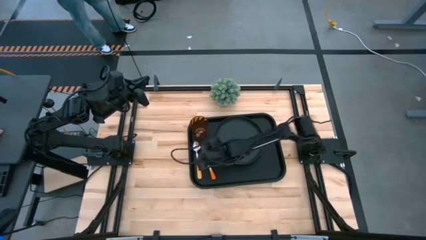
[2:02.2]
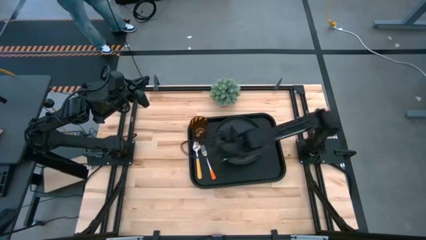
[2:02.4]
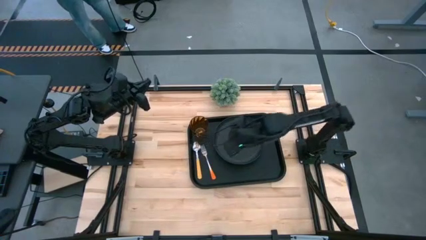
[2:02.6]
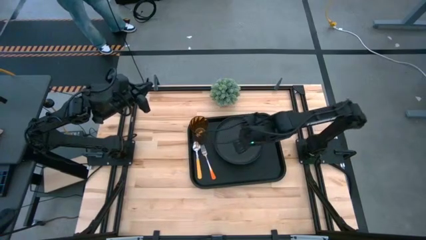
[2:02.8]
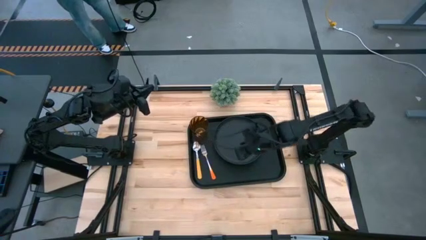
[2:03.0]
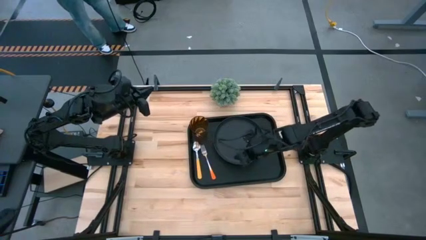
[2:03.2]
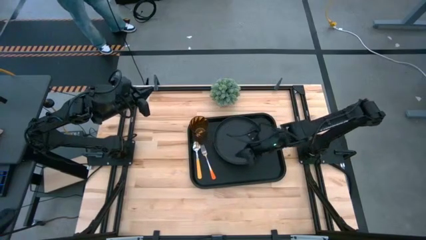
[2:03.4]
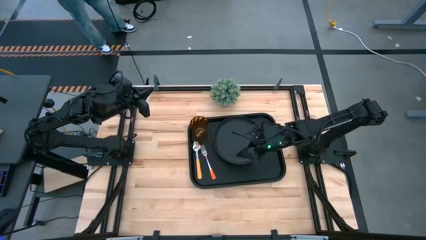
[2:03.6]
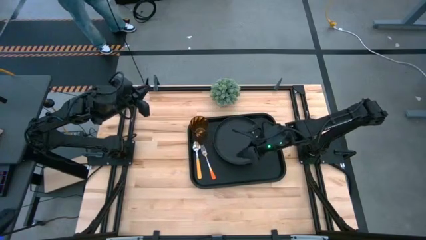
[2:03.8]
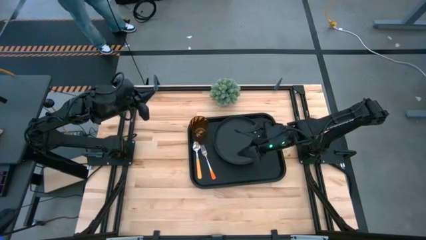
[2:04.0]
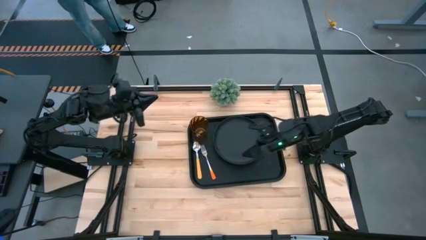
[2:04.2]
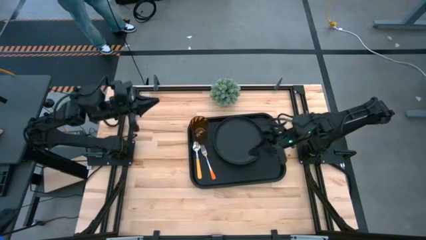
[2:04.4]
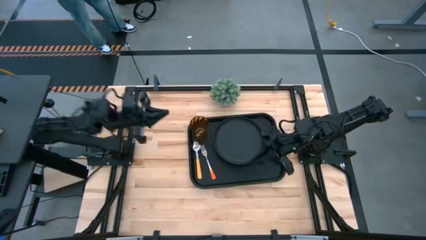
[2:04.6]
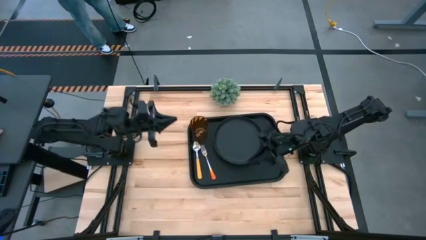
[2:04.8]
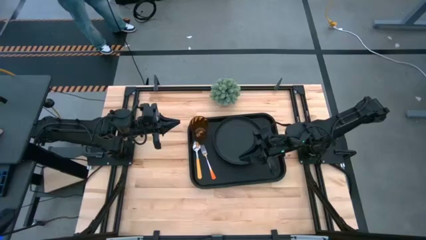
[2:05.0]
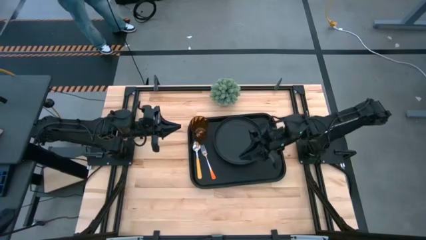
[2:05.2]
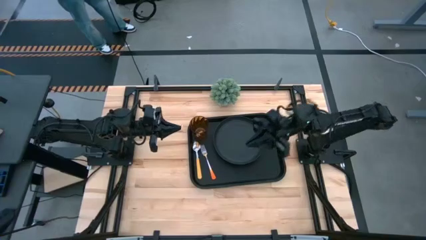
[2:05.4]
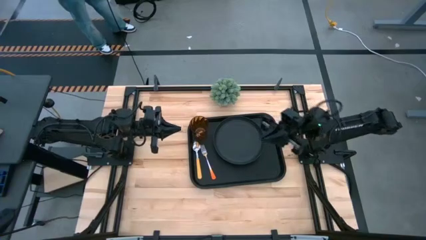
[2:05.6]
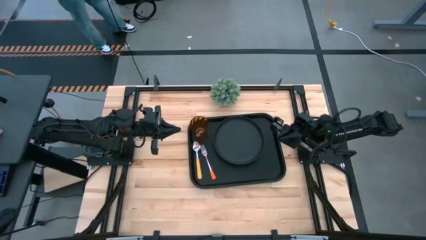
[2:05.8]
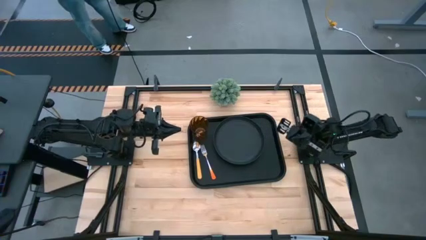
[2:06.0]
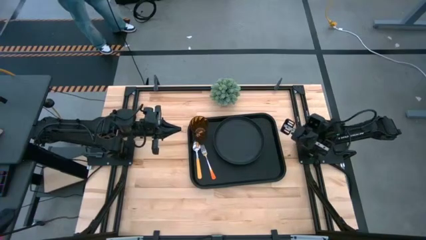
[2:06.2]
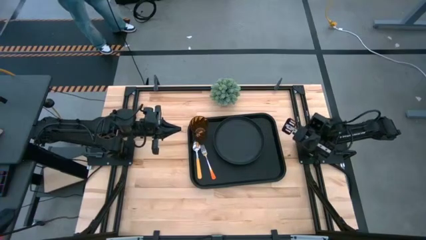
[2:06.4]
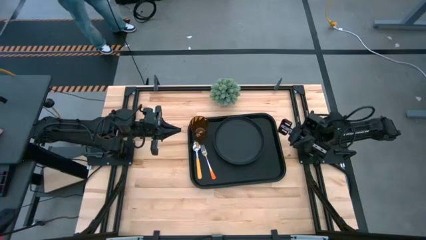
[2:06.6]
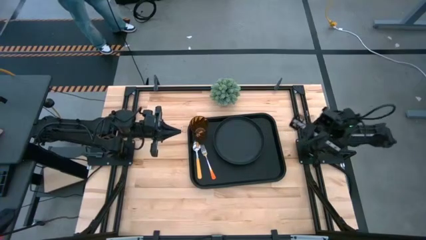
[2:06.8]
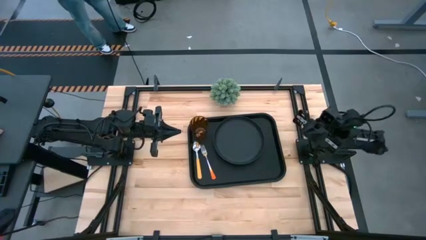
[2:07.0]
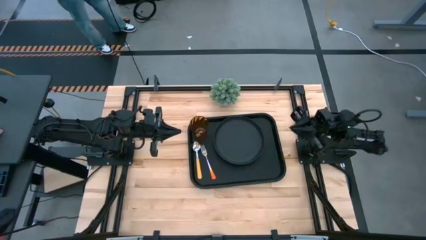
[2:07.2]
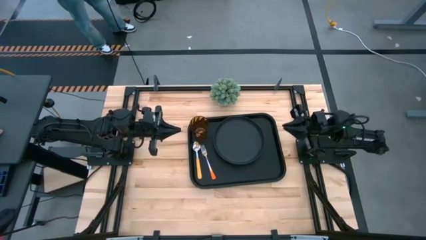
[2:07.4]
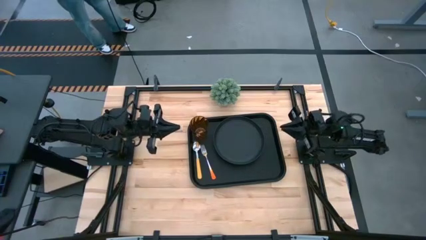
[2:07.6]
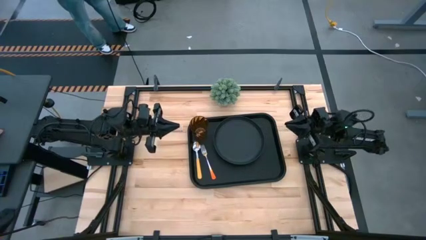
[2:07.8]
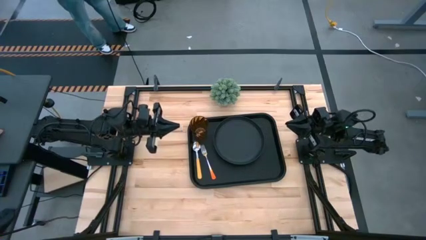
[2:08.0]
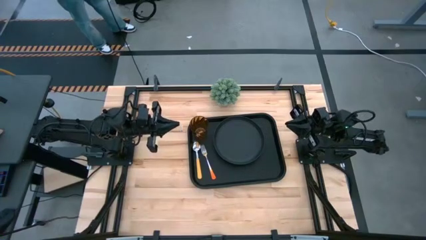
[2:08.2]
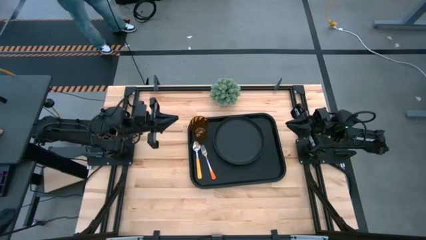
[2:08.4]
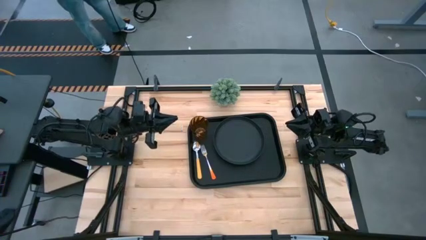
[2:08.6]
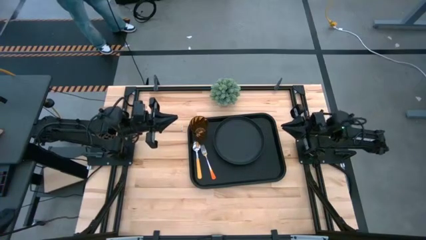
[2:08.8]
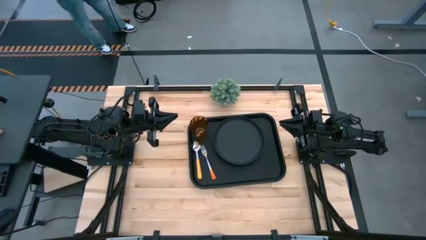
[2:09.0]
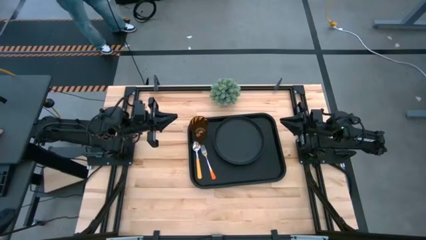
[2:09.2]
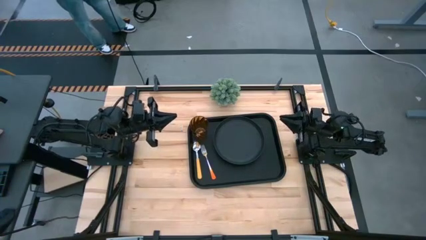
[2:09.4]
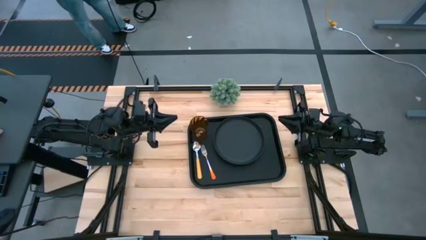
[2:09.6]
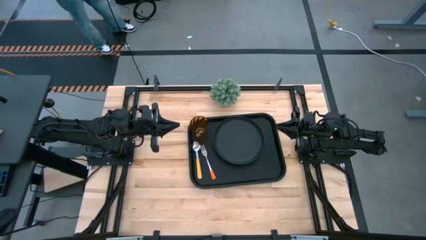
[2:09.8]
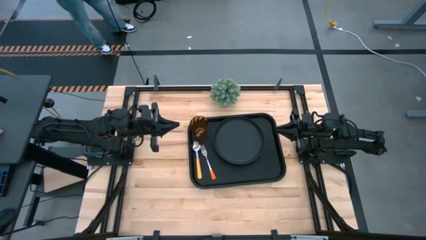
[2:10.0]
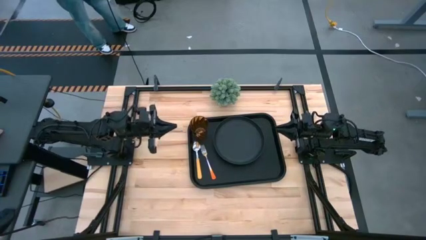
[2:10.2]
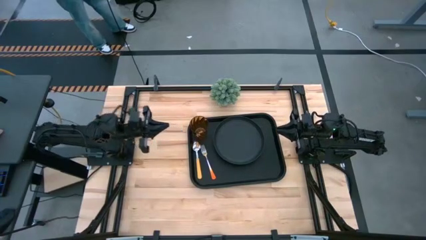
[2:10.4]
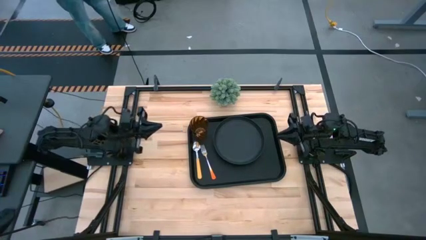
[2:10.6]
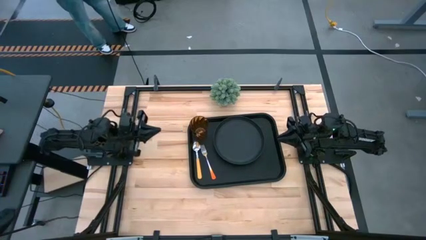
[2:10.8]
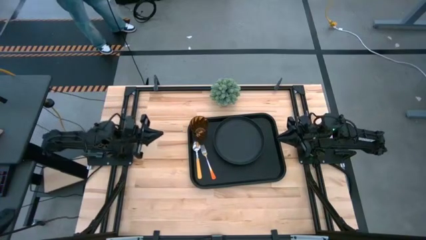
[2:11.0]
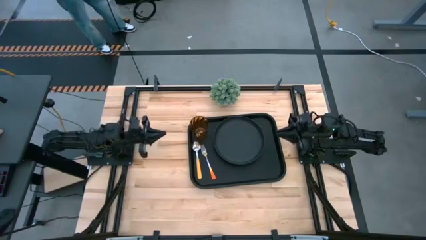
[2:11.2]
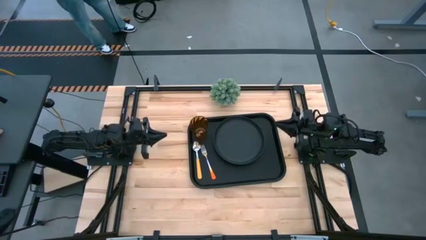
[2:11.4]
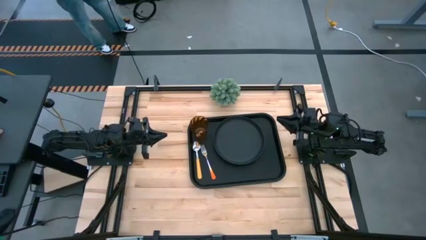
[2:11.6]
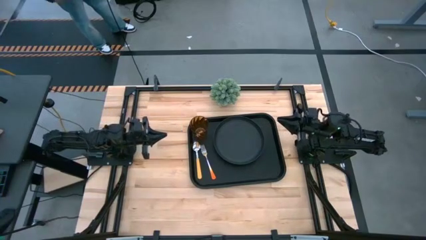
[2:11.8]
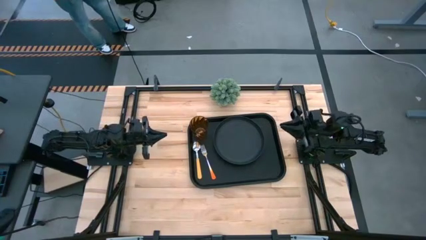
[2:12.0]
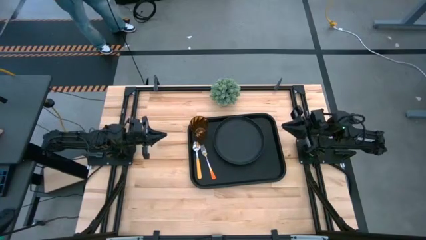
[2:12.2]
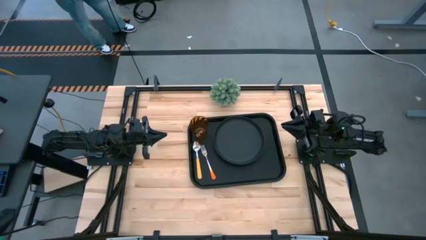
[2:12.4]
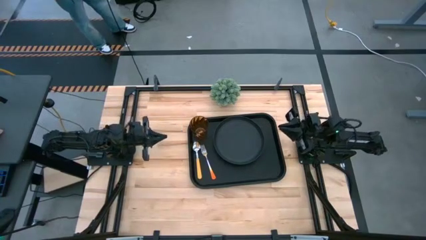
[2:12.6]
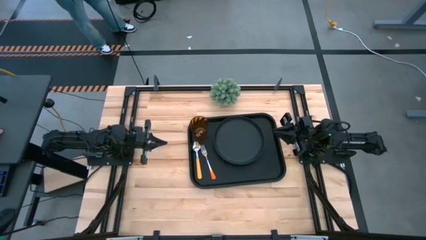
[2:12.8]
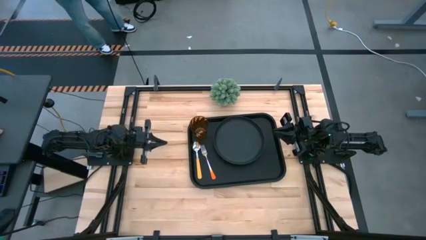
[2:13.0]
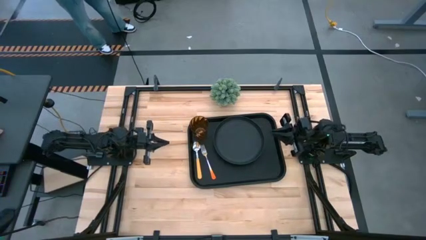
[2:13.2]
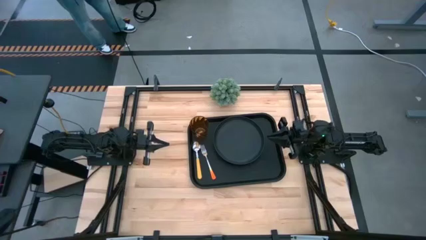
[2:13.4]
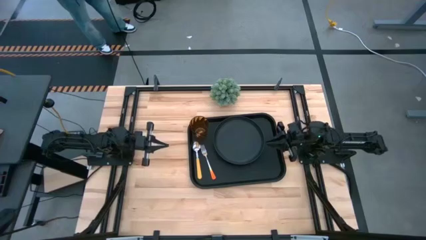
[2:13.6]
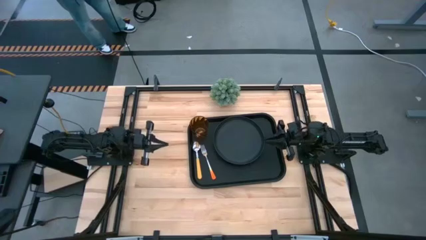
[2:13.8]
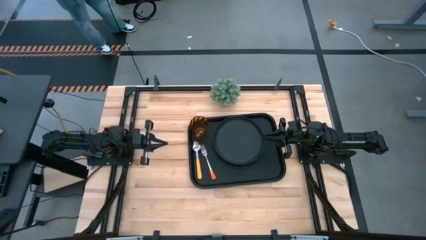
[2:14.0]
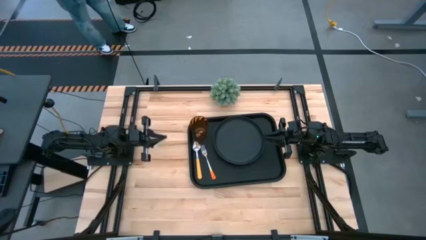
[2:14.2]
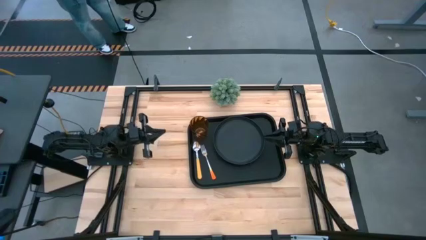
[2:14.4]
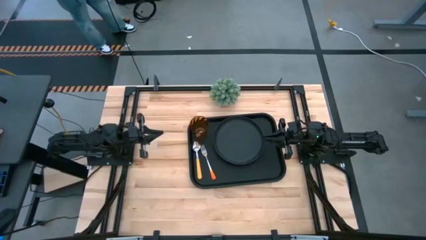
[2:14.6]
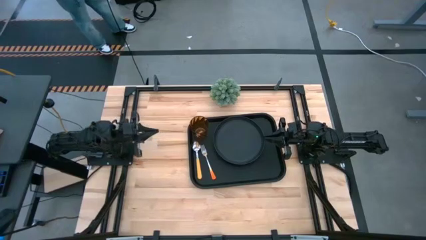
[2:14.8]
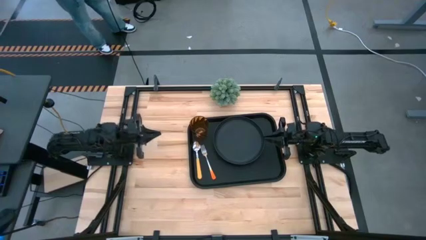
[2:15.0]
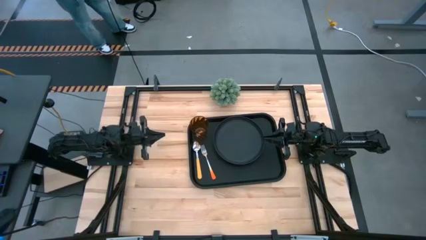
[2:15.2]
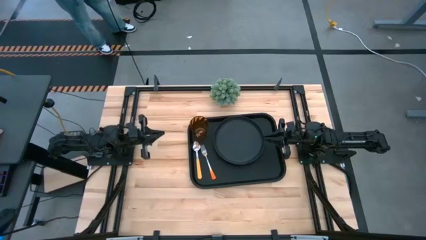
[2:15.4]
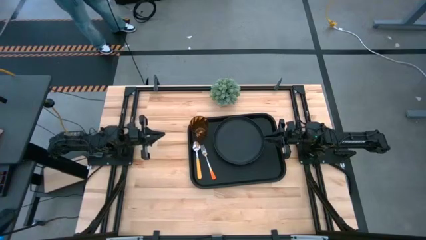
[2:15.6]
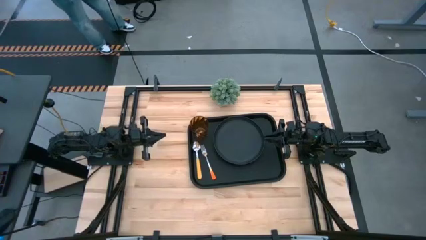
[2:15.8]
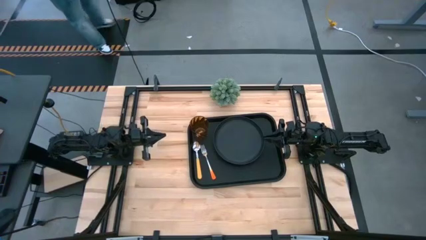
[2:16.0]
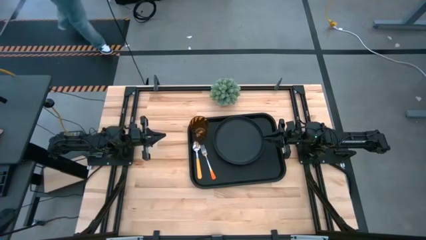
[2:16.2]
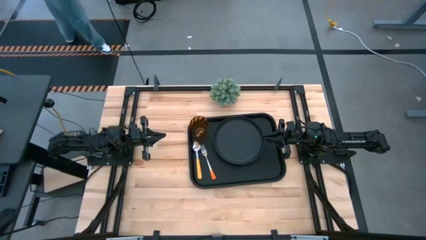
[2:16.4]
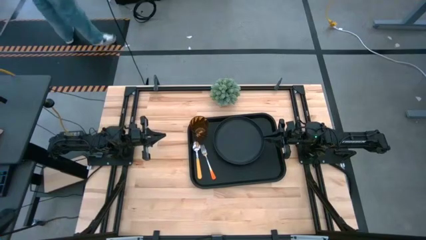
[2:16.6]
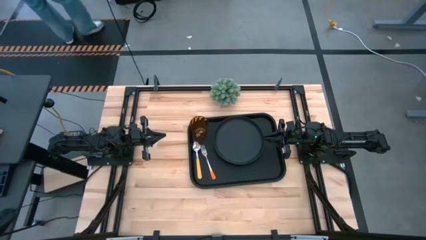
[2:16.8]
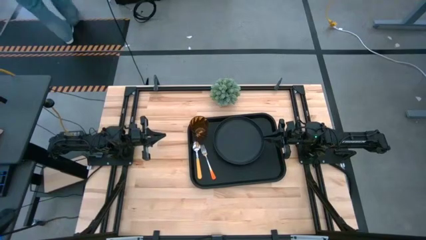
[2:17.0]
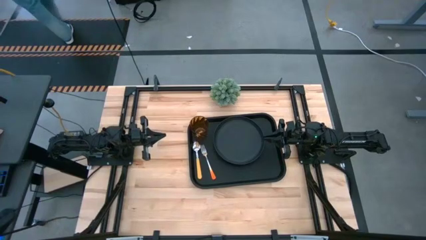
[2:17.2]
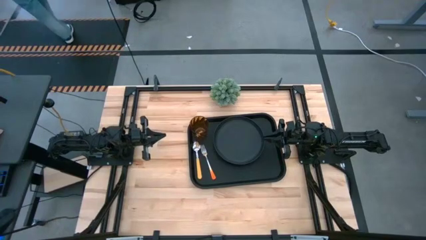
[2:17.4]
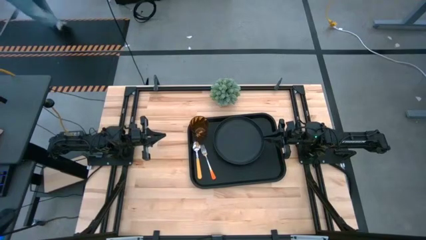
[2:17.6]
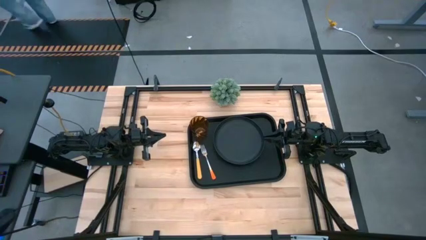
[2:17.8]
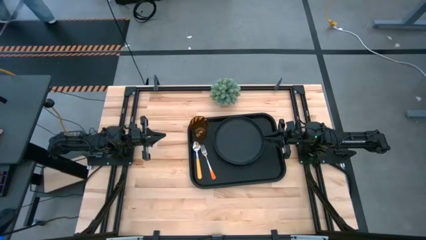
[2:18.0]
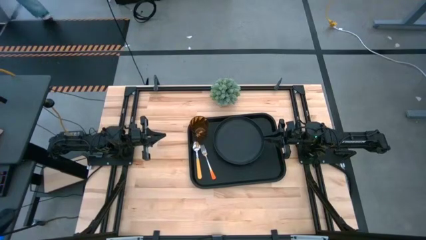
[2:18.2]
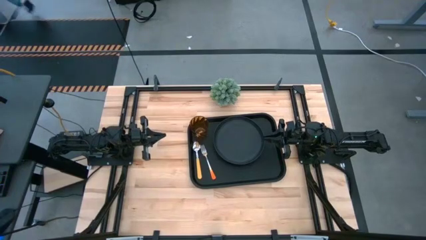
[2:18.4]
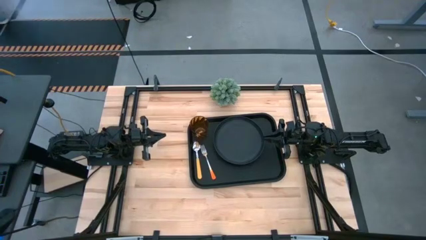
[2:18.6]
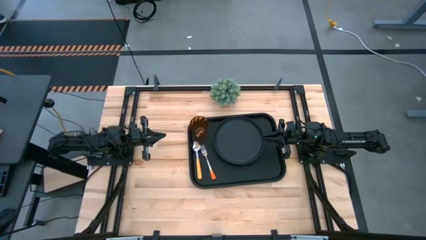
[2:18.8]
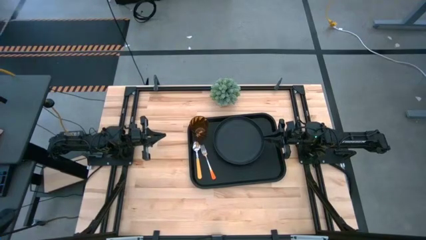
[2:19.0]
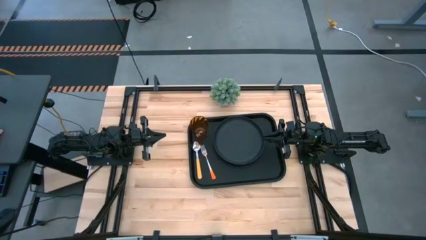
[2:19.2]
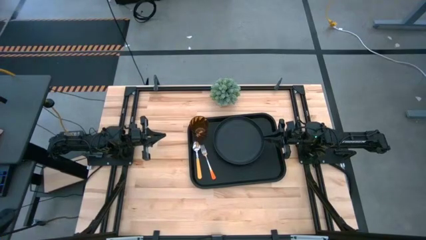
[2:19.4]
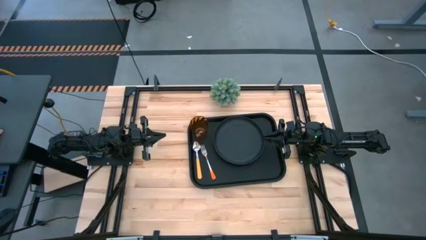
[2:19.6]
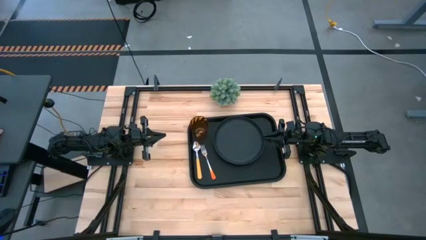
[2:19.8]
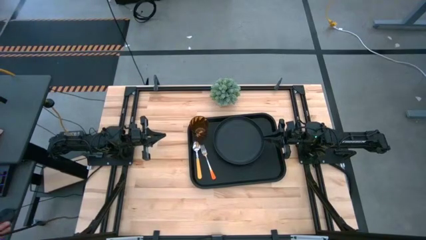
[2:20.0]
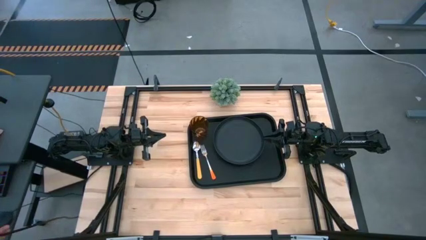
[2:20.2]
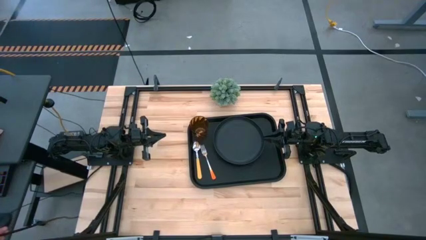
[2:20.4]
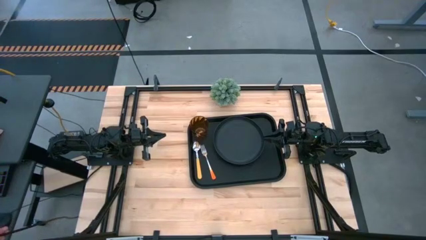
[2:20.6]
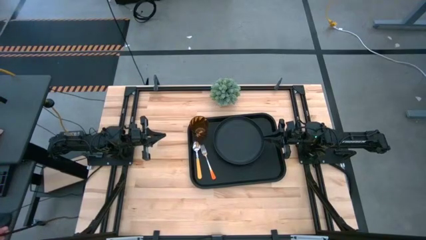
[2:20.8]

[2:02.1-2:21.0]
Task: Pick and place plate/cup/fork/spoon on tray
Return to Home Position
